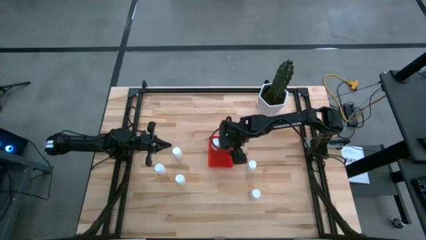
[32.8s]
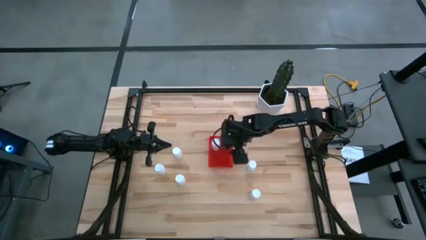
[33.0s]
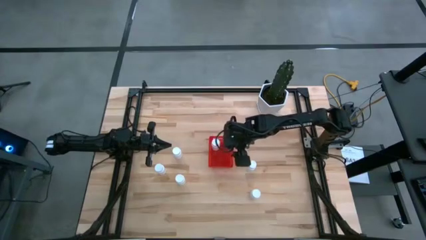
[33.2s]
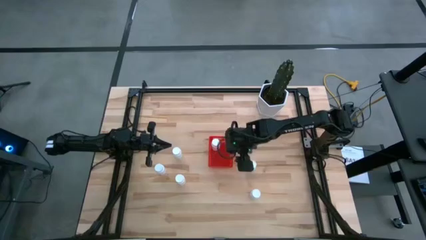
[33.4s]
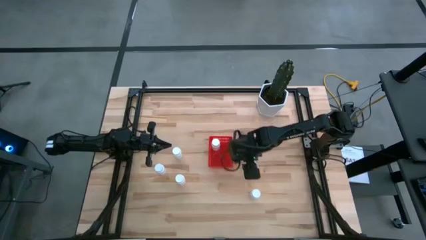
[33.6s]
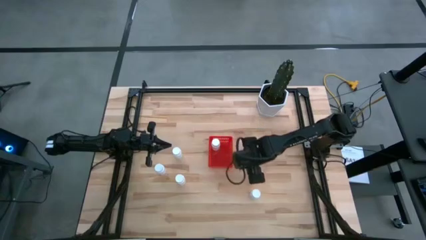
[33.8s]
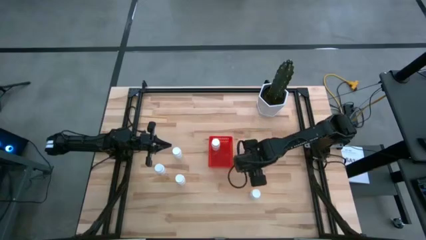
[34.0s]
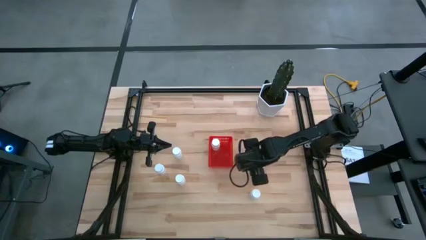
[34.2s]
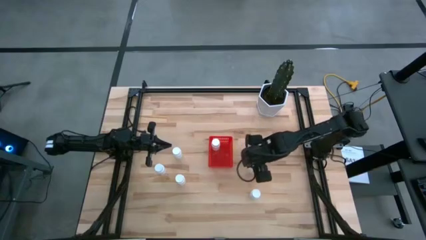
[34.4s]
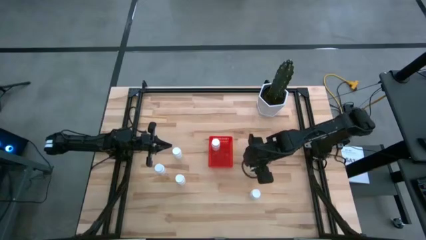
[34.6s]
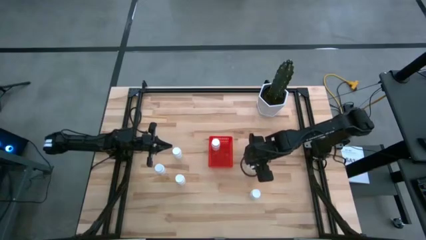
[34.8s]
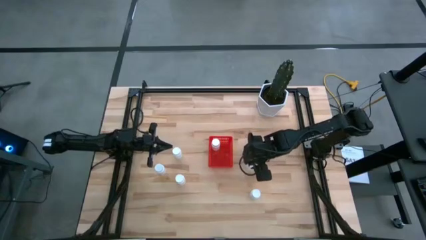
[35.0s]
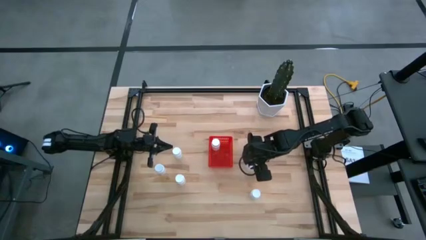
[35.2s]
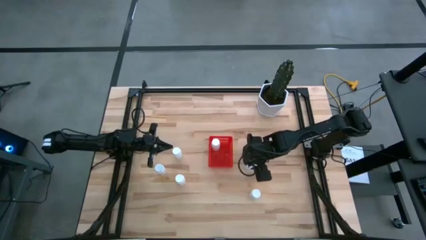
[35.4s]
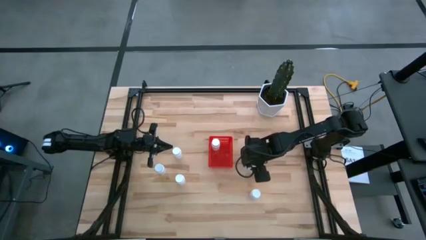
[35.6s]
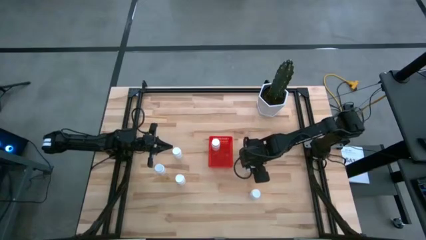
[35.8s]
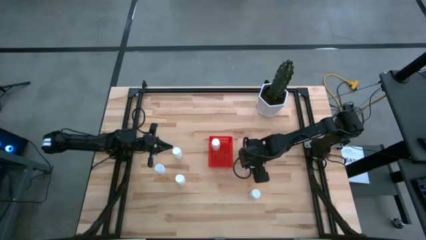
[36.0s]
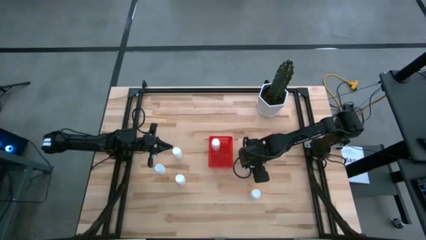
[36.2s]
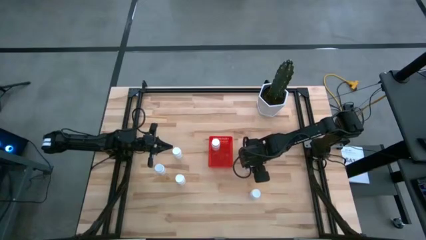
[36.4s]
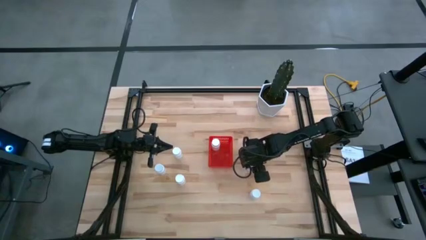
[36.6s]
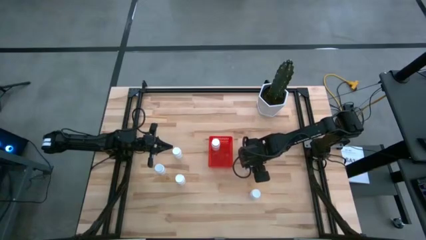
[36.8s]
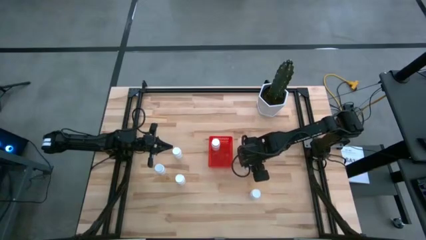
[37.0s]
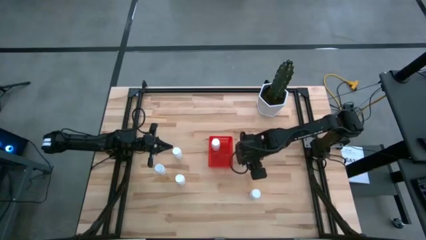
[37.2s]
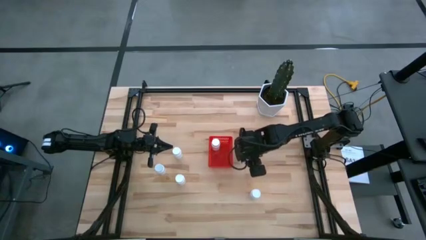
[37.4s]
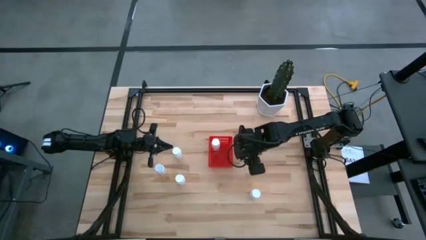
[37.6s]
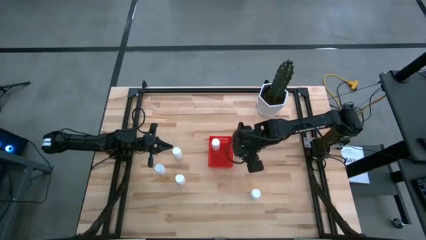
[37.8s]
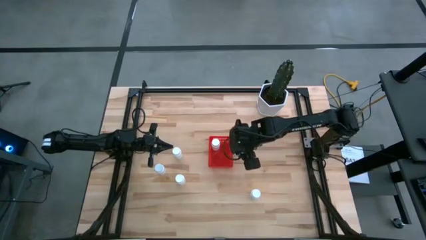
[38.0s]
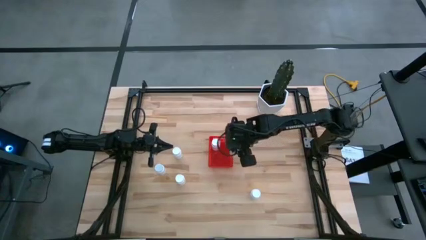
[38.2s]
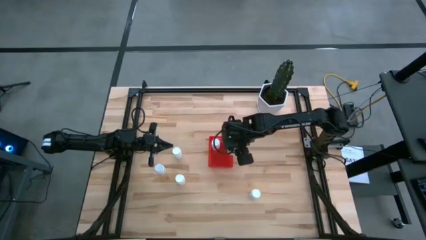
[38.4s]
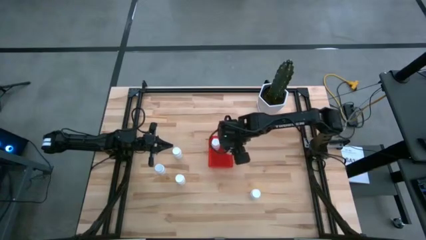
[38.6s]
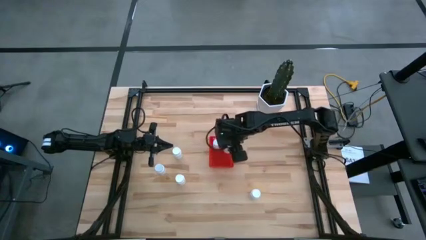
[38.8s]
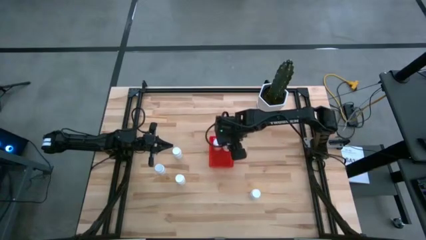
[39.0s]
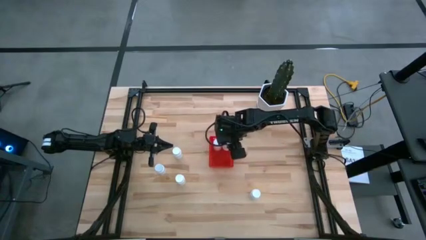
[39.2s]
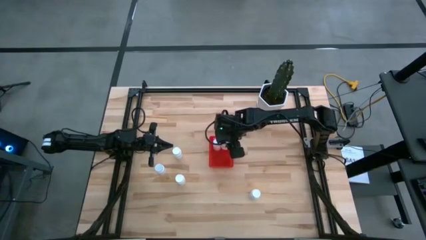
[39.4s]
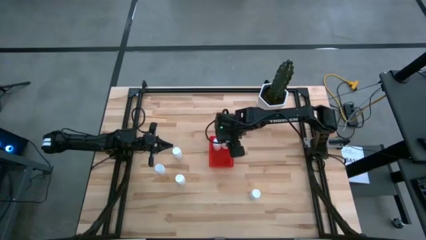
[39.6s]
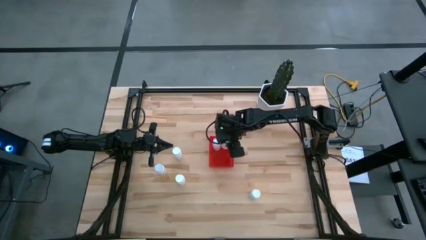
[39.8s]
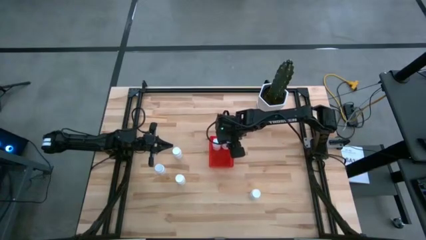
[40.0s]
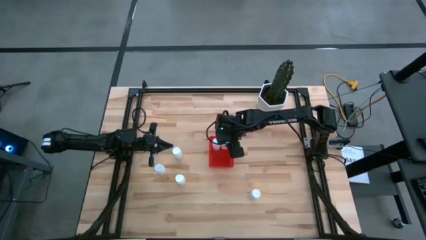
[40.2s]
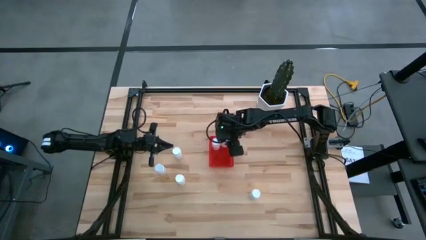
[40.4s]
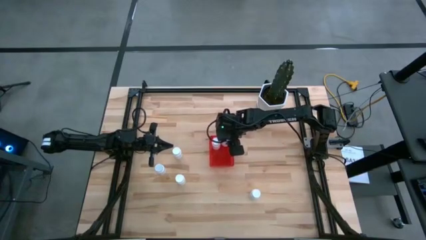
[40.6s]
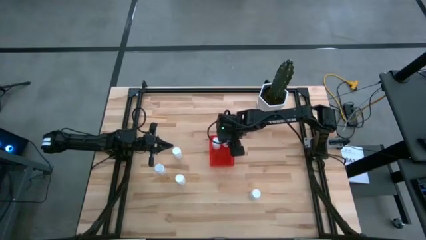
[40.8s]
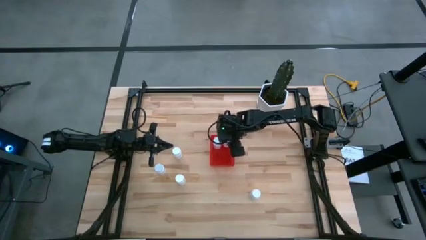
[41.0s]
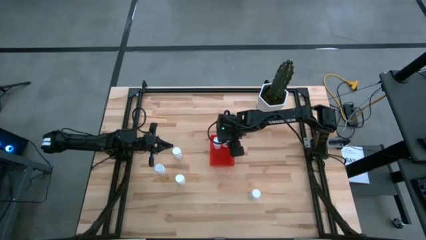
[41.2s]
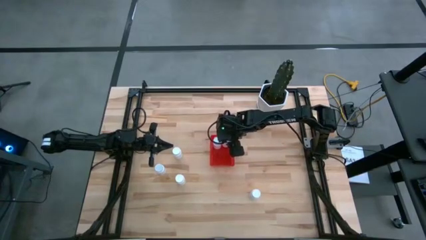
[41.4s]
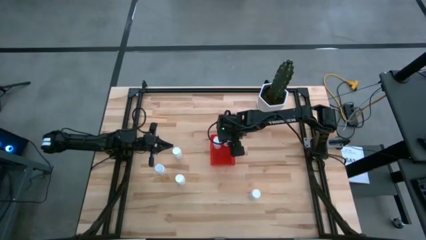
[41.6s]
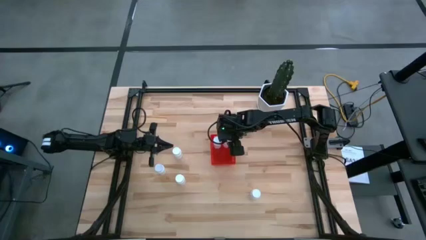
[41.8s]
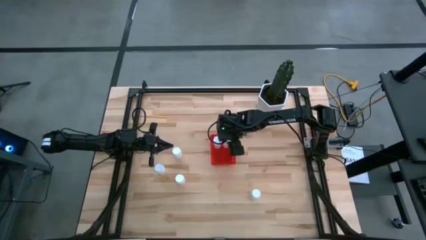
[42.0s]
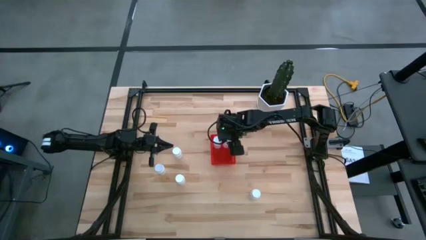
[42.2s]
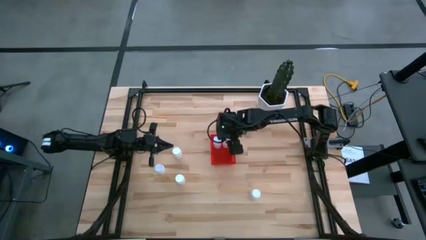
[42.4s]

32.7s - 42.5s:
Task: Pick and place pill bottles into a basket
Put the white pill bottle into the red bin

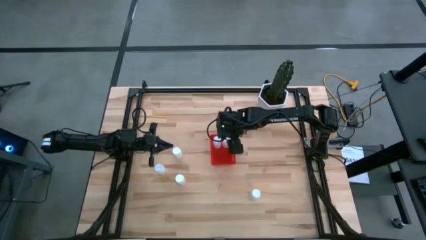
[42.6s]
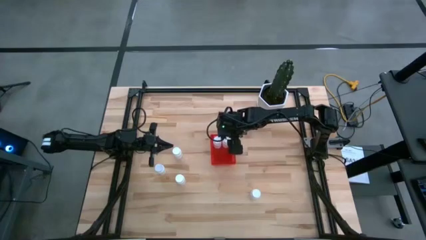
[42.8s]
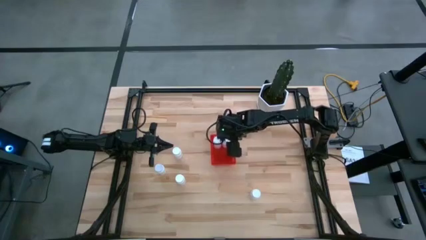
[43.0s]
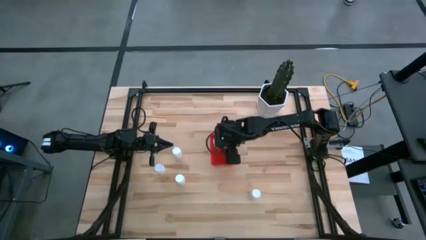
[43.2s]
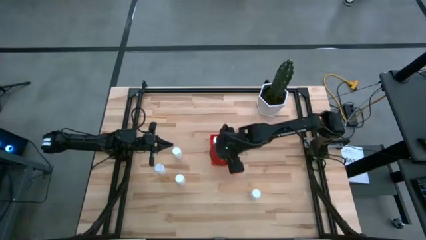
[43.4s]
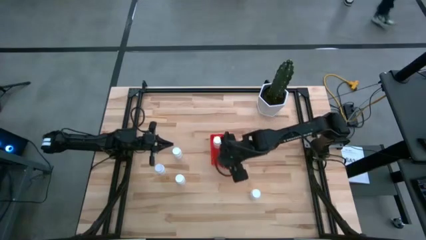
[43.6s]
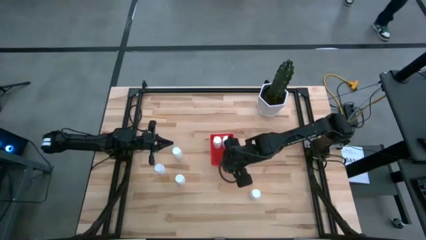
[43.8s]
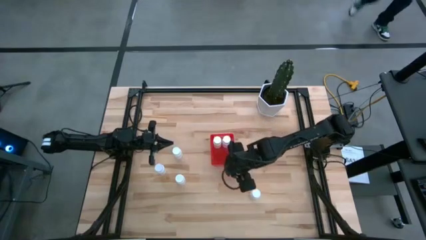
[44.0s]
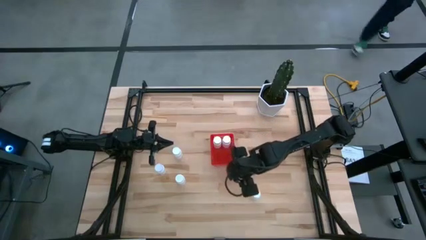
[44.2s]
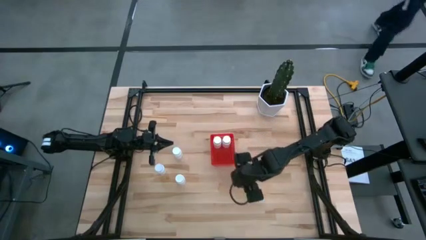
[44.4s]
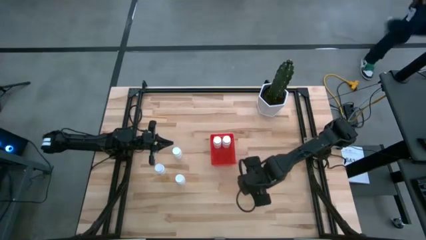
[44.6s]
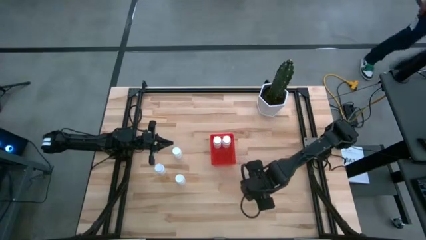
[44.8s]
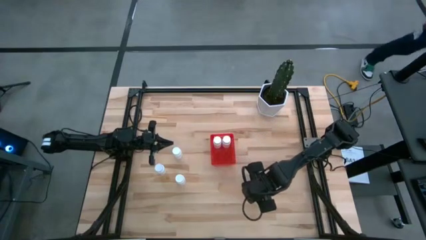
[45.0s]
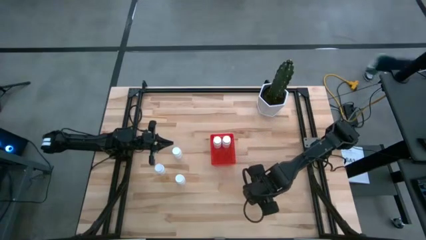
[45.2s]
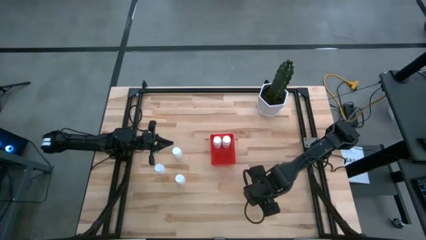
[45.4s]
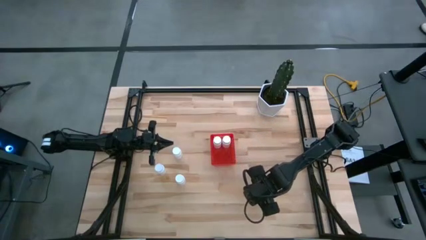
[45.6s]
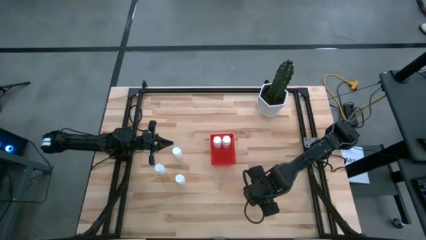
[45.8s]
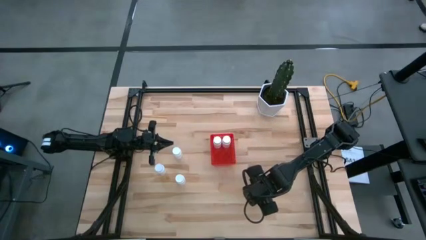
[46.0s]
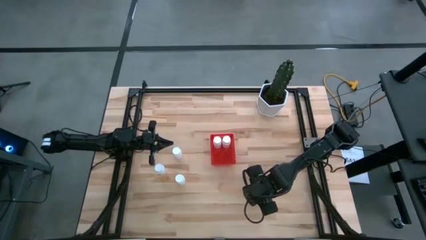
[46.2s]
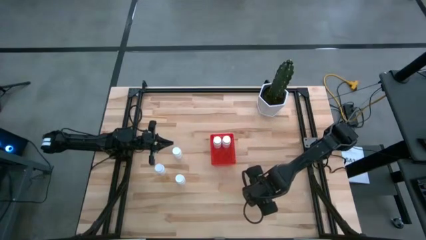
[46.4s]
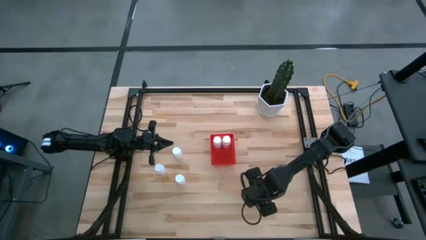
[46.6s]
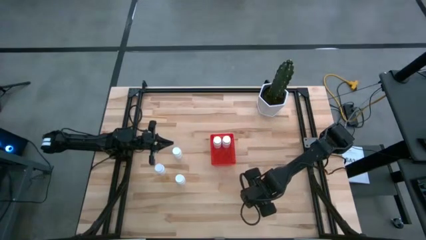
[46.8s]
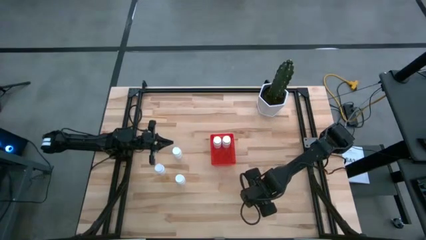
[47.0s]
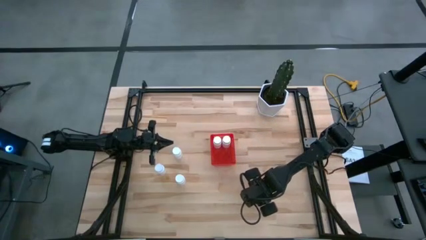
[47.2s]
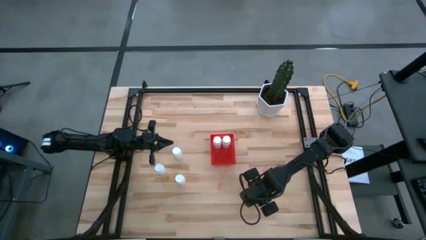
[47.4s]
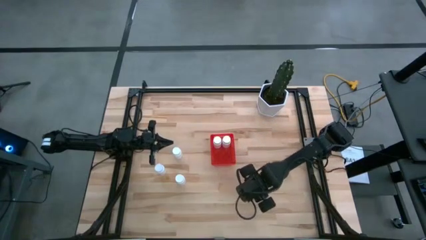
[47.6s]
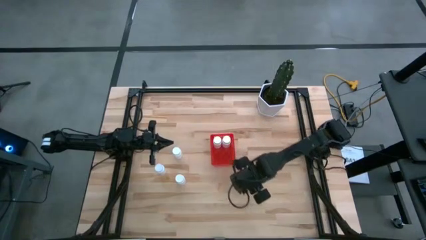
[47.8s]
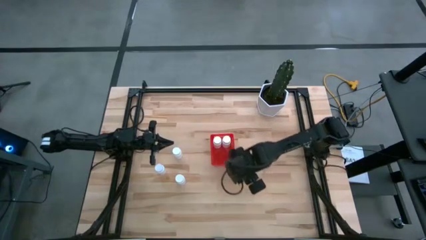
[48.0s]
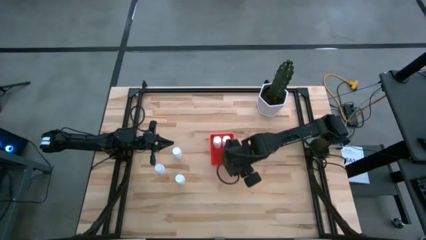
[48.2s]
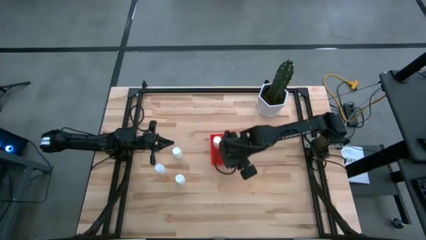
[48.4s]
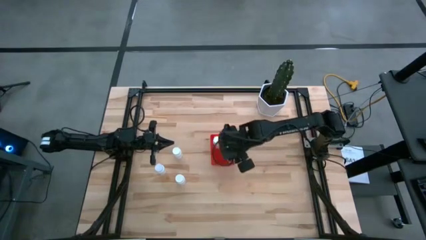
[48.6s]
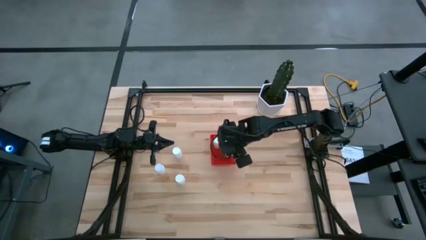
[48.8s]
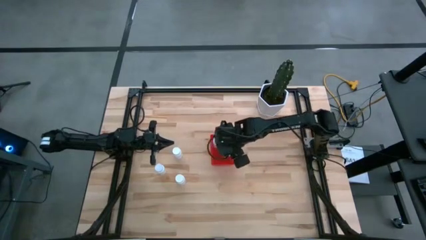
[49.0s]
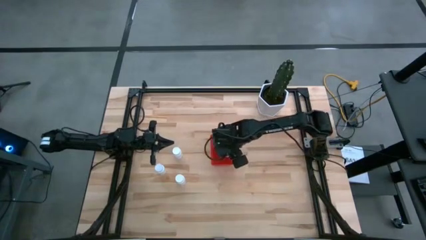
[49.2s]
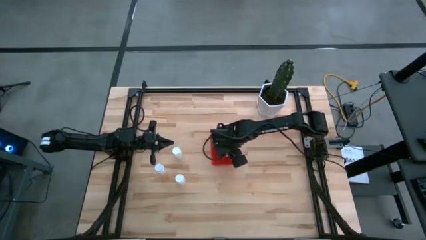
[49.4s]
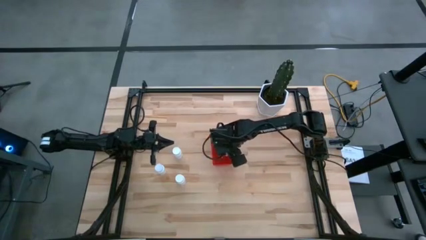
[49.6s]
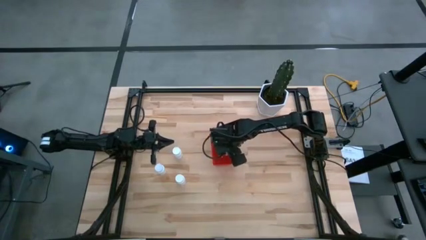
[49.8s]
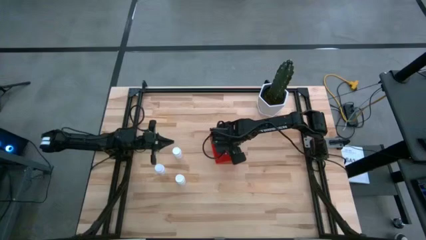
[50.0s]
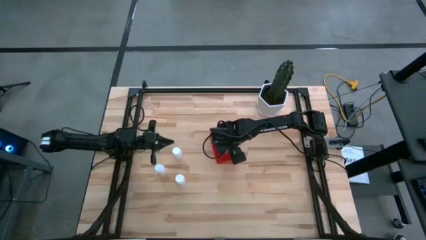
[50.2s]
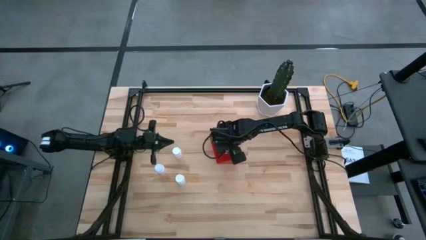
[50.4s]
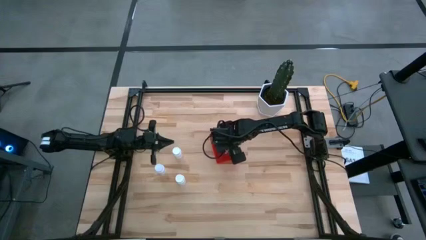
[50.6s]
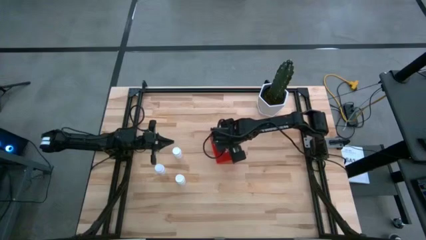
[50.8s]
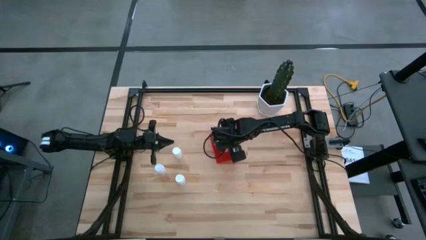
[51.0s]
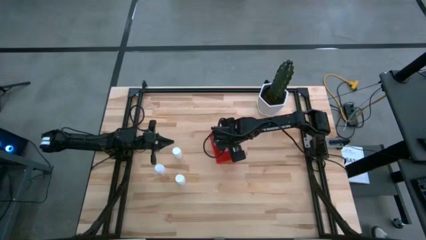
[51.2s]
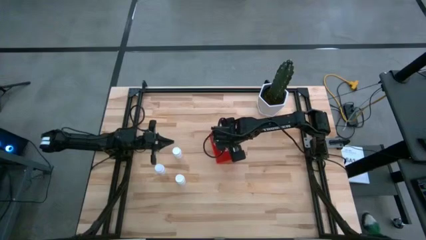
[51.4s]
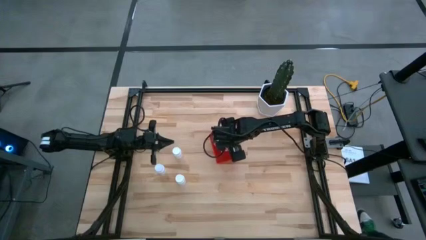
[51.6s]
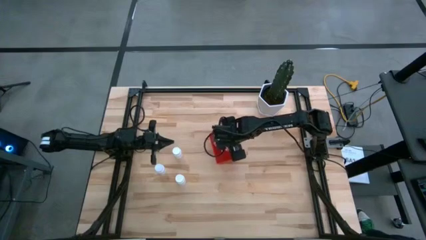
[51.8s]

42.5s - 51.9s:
Put the white pill bottle into the red bin
